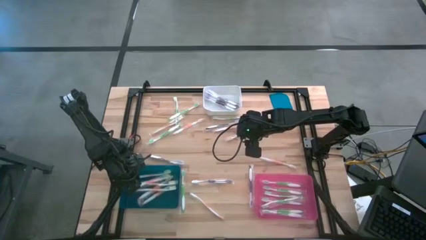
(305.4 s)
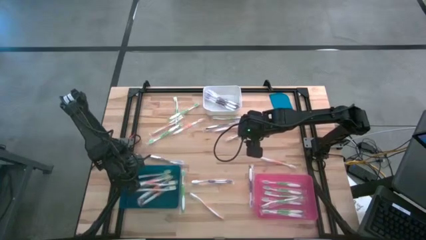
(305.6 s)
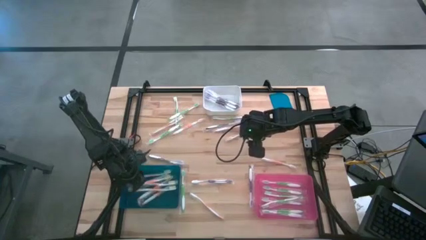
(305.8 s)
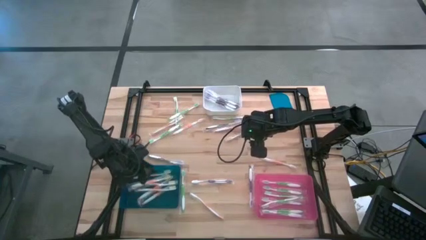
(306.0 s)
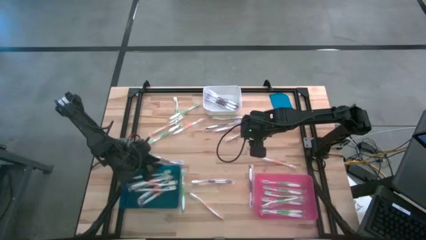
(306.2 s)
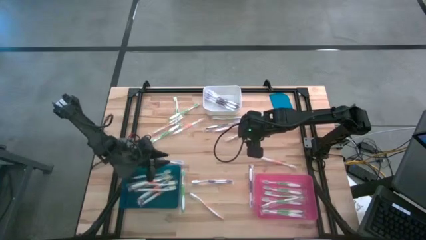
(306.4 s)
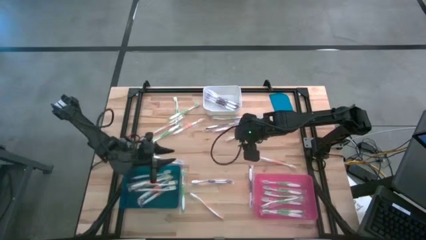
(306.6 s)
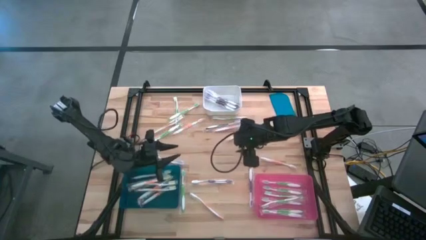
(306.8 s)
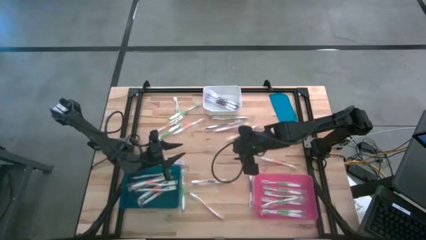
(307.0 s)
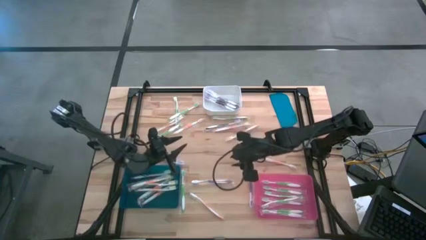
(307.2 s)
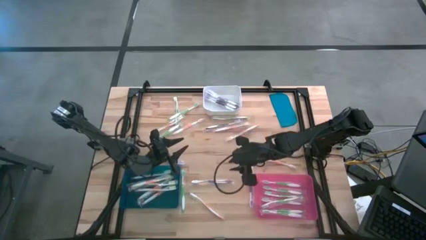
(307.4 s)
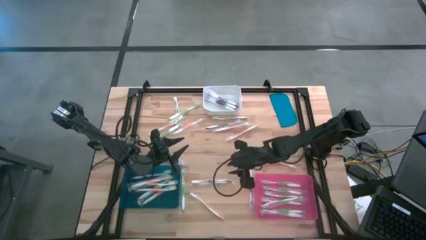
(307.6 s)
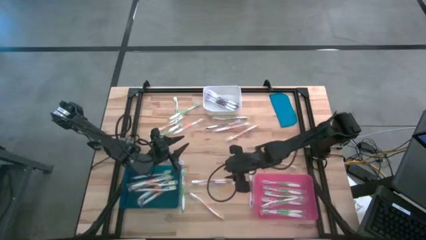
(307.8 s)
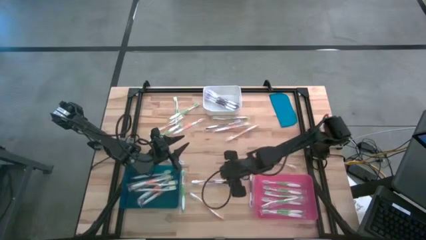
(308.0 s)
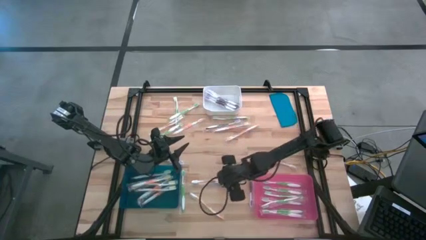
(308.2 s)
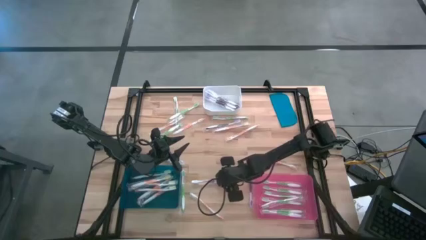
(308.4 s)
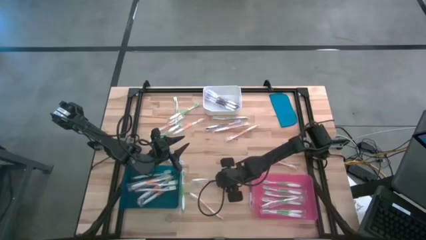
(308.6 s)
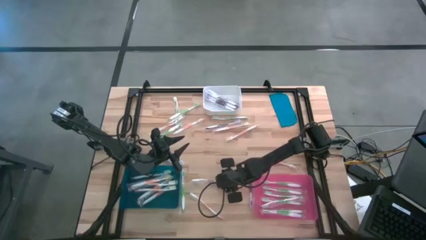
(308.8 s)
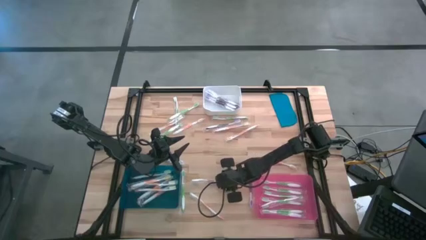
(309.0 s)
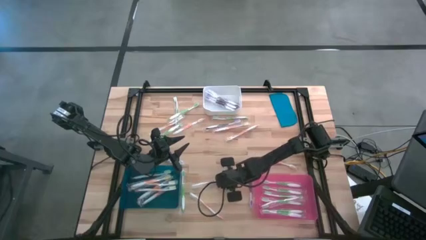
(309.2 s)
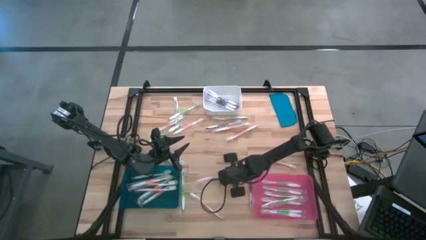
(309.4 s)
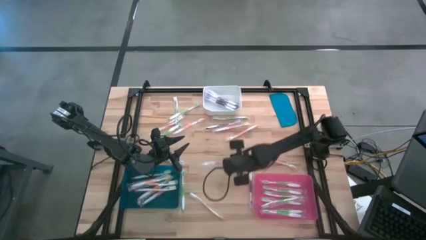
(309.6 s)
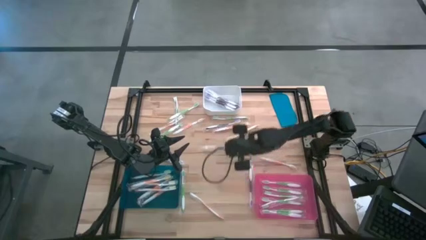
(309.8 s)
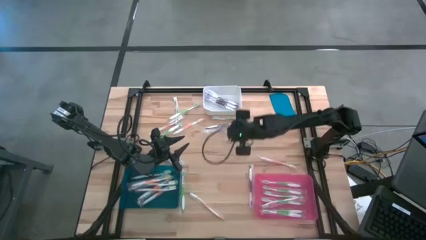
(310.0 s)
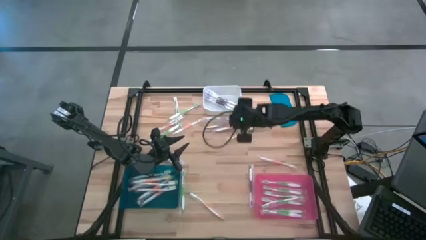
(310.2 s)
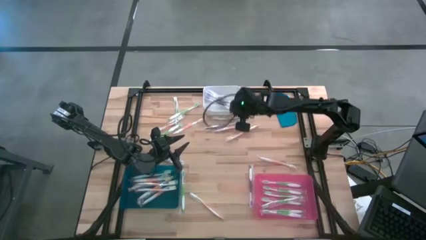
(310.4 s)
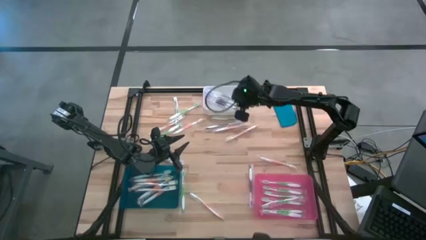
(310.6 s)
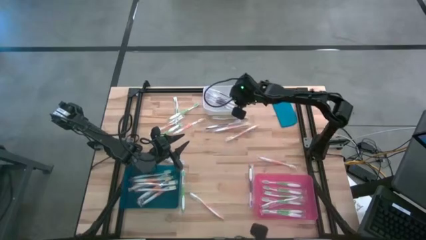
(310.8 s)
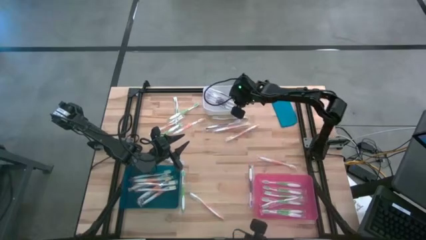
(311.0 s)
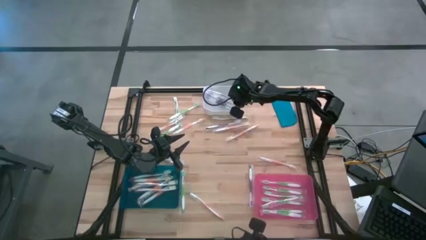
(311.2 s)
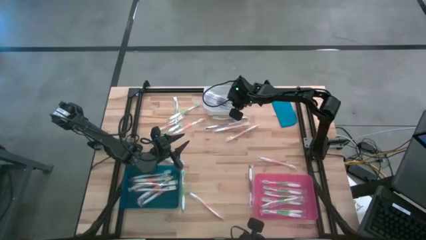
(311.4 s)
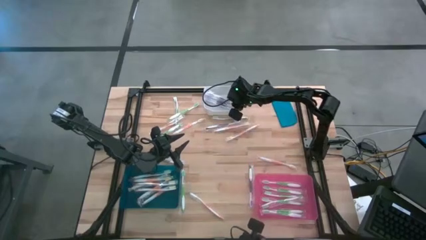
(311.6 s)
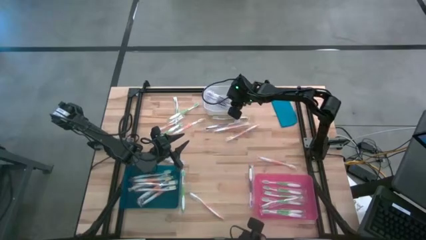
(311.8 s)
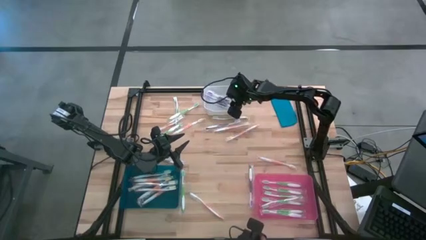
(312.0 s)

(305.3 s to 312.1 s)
Task: Pick & Place Toothbrushes
Put the violet toothbrush into the white bin
